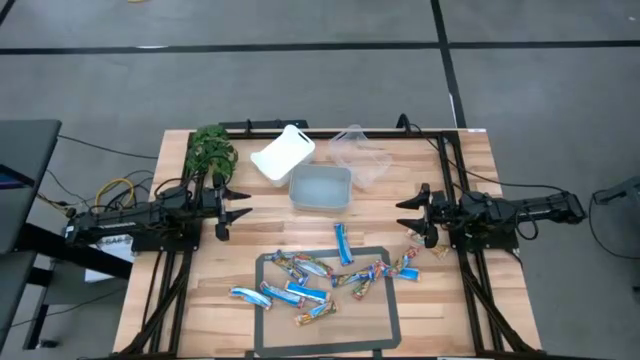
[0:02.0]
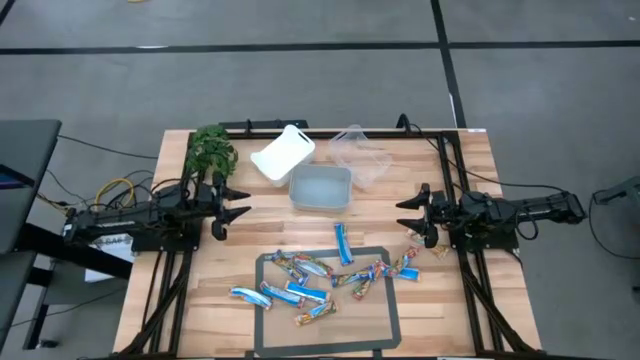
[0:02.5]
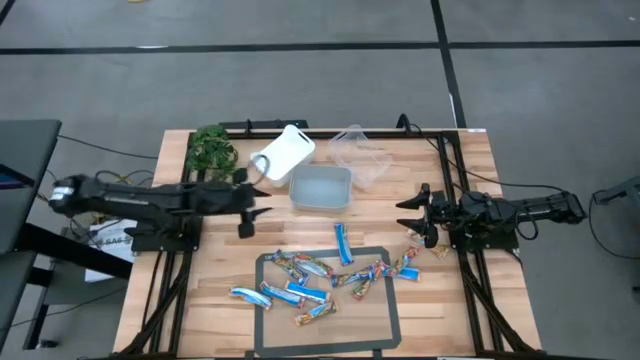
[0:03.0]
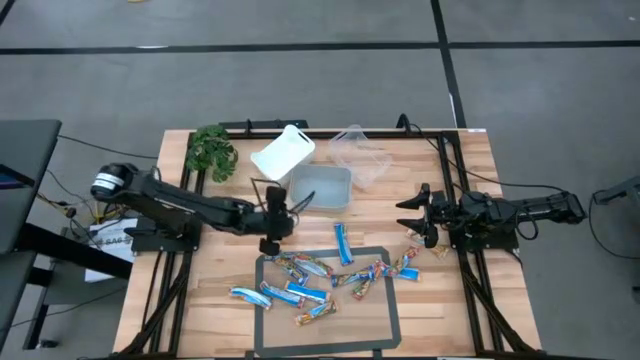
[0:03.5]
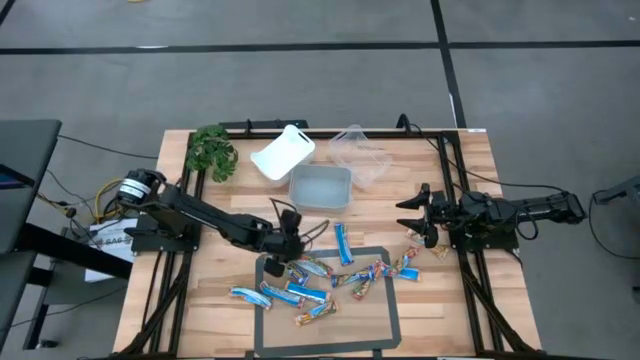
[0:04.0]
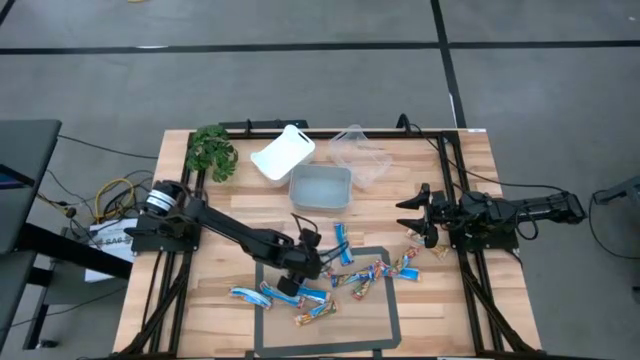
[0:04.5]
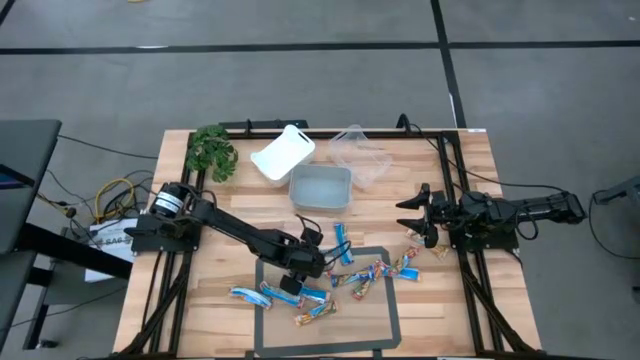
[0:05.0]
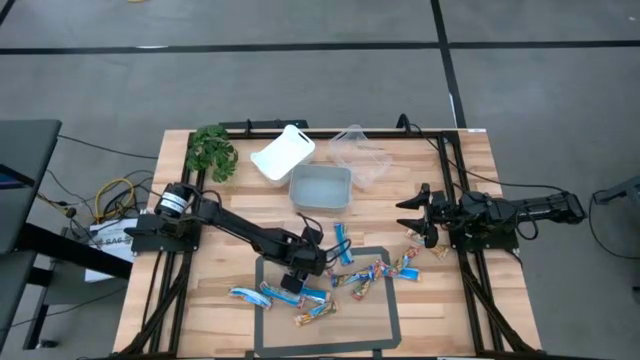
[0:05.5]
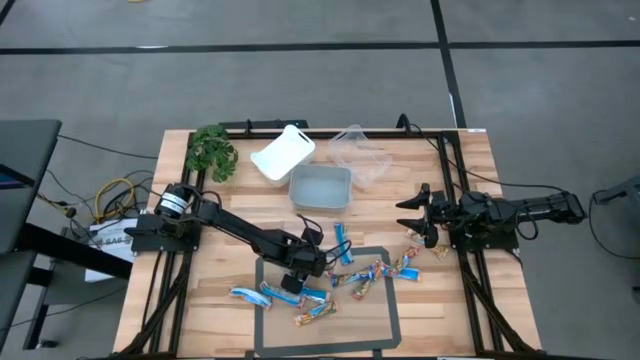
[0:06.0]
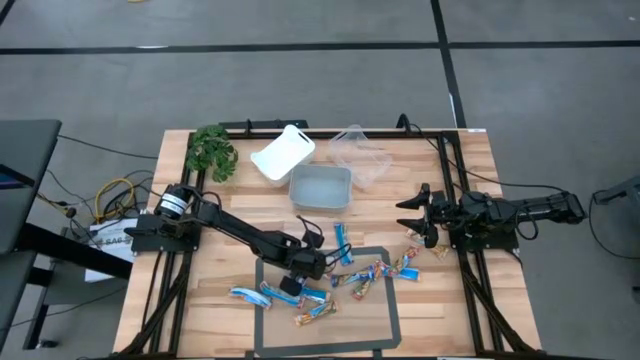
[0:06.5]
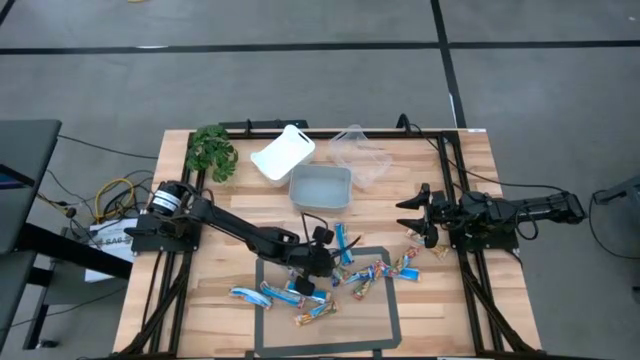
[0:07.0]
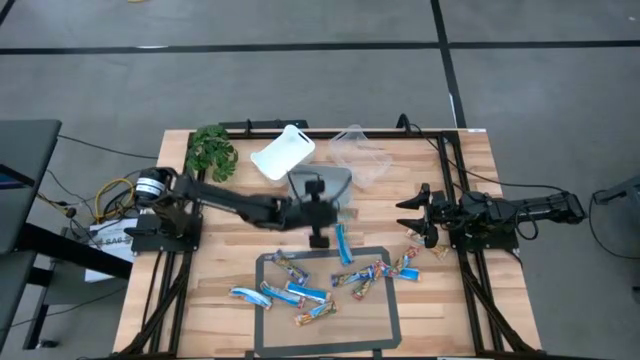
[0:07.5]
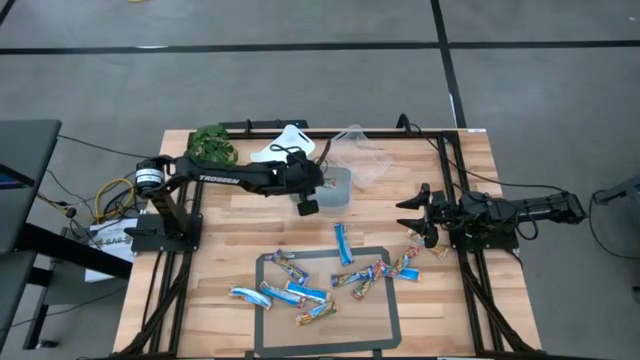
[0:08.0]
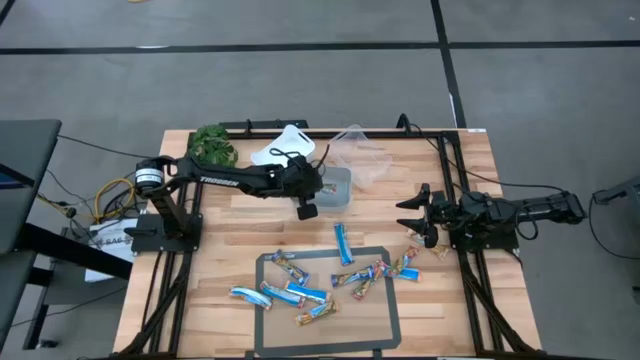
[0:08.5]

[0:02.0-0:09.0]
Task: Pick and place Granola Bars by type
Put the red granola bar into the gray bin

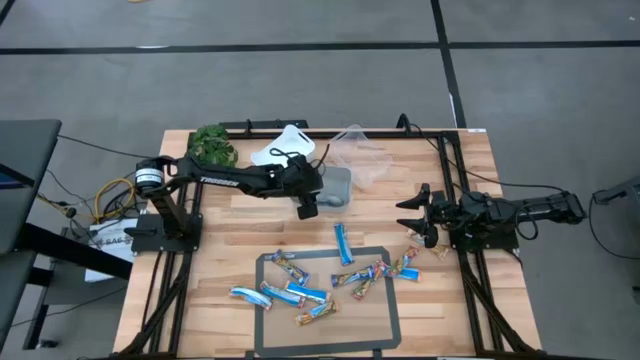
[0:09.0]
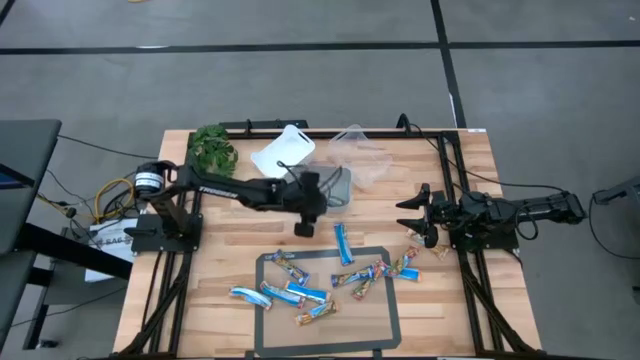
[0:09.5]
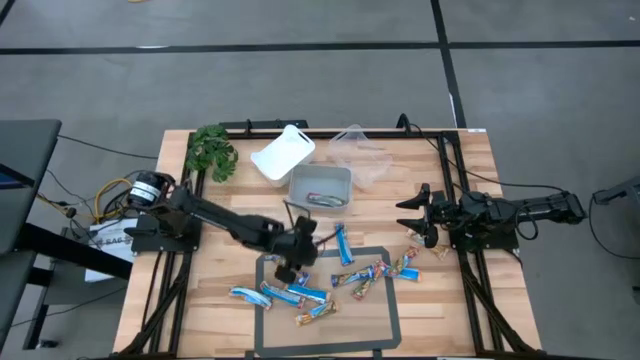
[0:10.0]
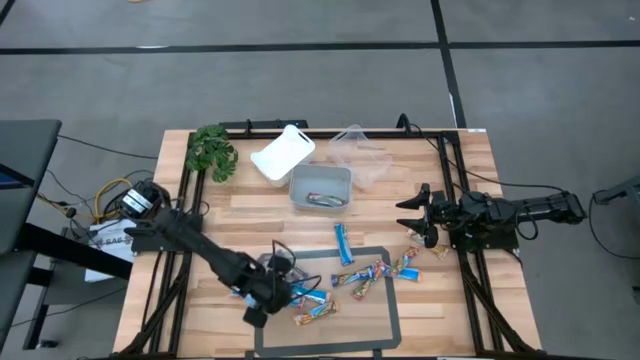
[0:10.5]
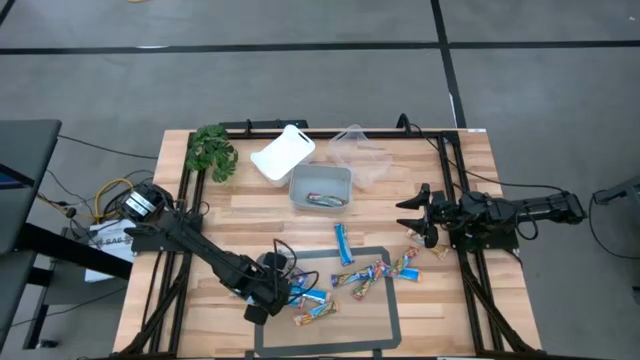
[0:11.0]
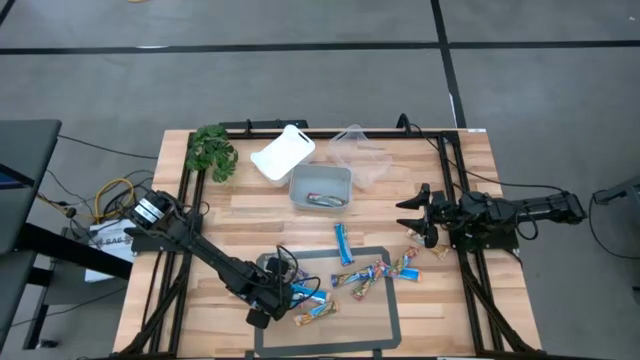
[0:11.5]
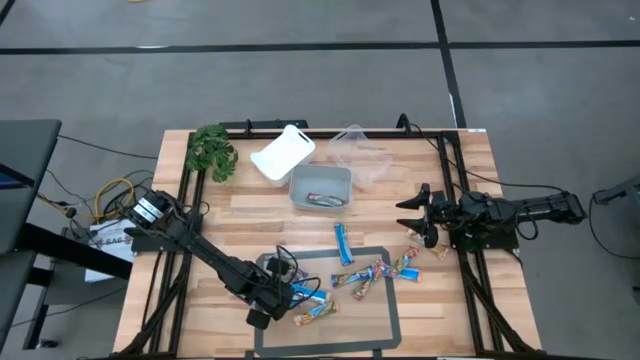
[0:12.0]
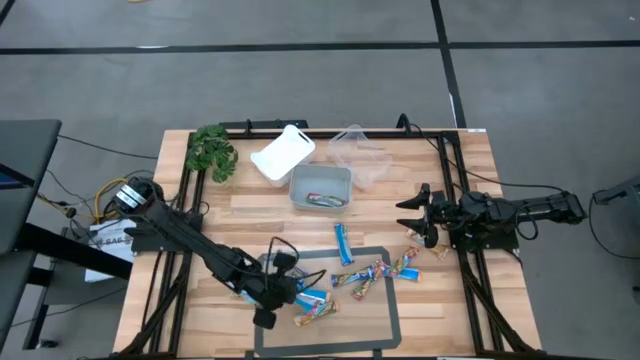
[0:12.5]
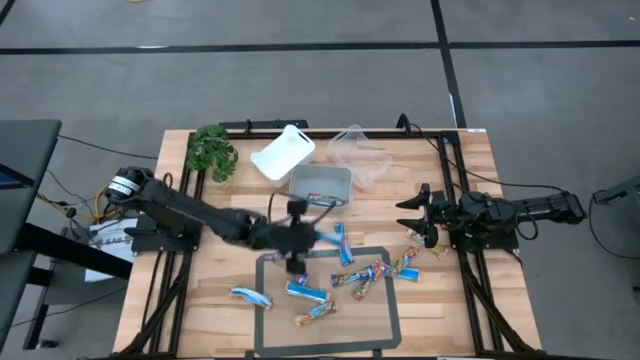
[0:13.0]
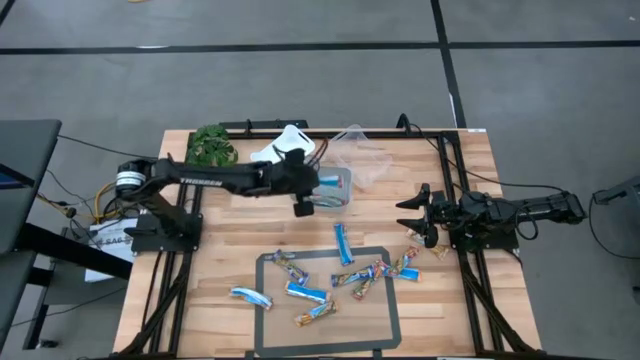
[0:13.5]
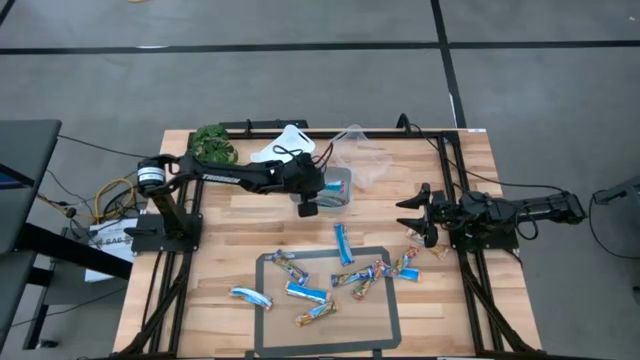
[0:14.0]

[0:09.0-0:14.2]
Put the red granola bar into the gray bin

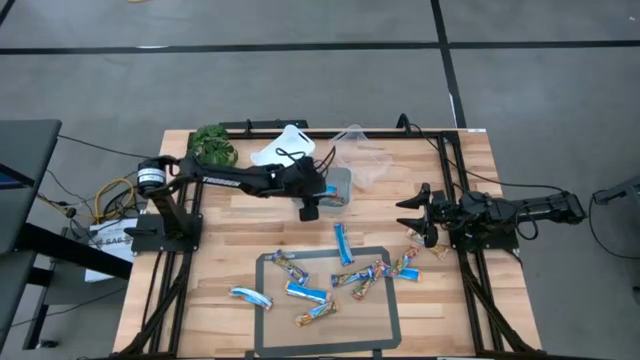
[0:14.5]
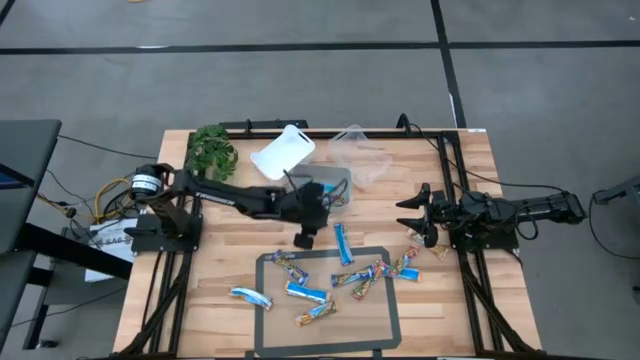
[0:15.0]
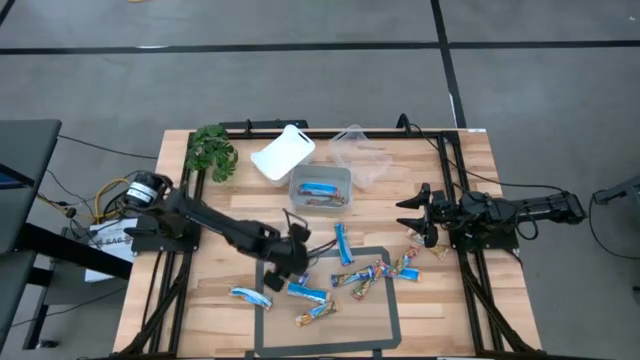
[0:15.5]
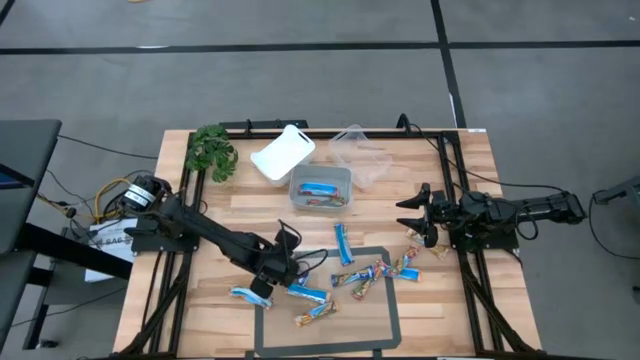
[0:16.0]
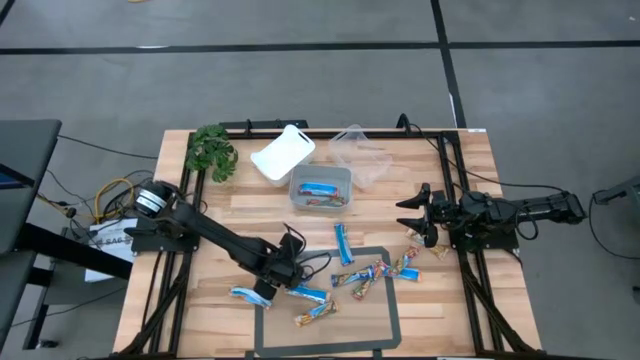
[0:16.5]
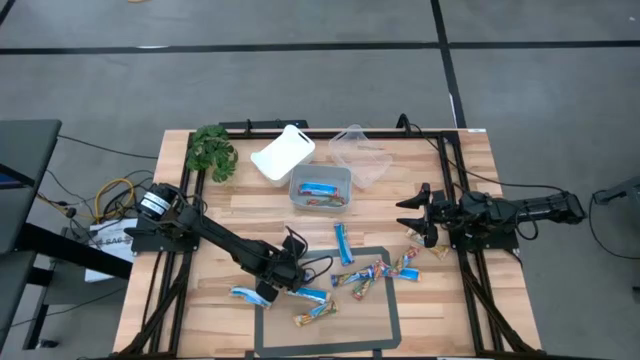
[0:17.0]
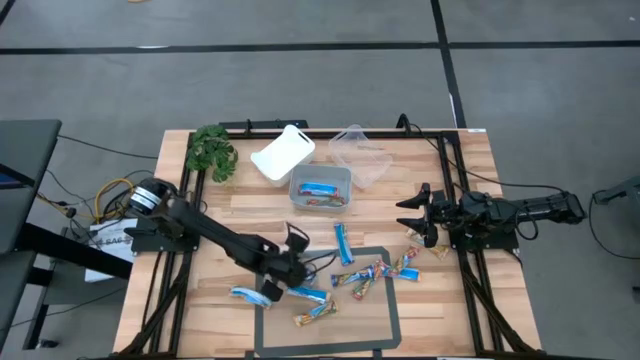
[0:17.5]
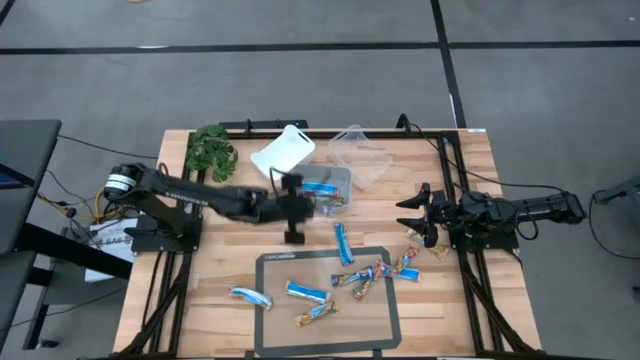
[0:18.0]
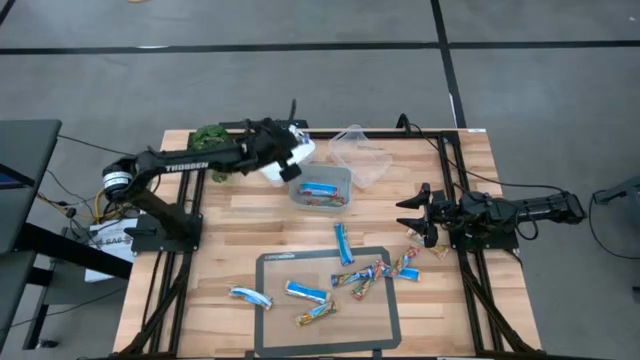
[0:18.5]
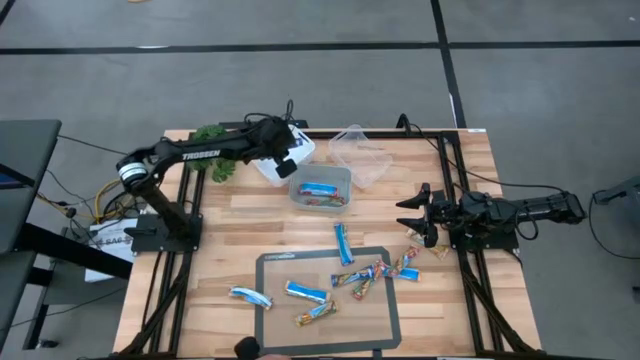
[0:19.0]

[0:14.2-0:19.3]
Put the blue granola bar into the white bin

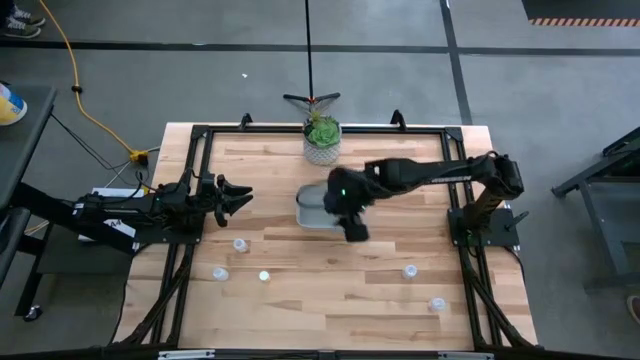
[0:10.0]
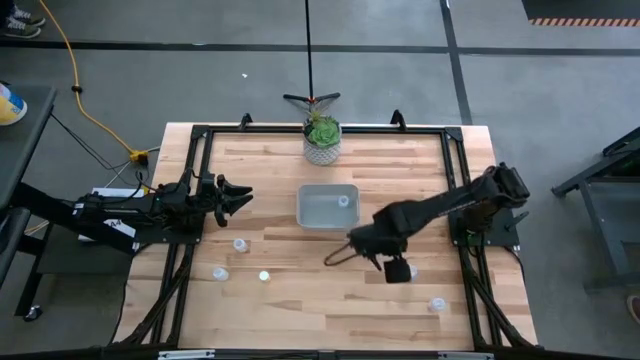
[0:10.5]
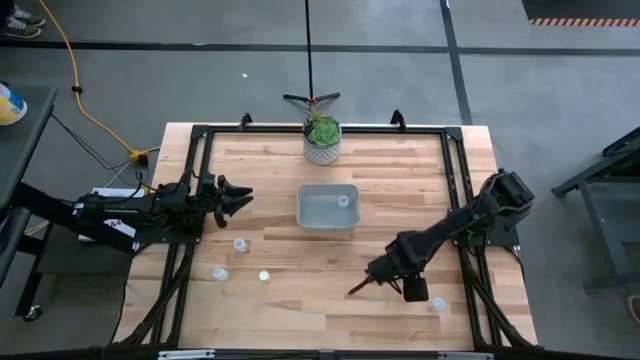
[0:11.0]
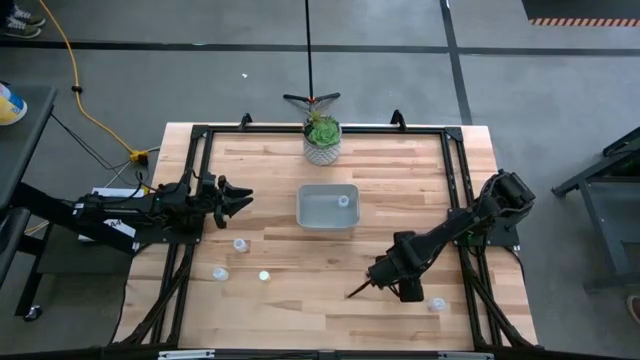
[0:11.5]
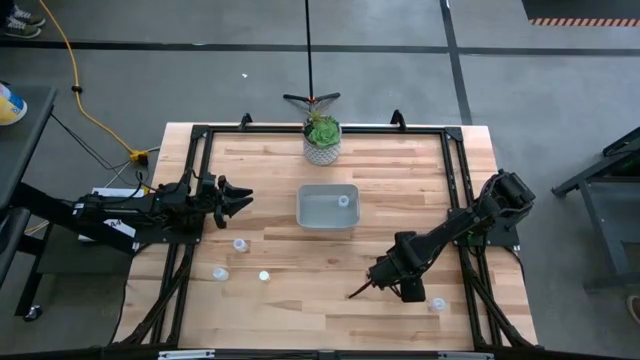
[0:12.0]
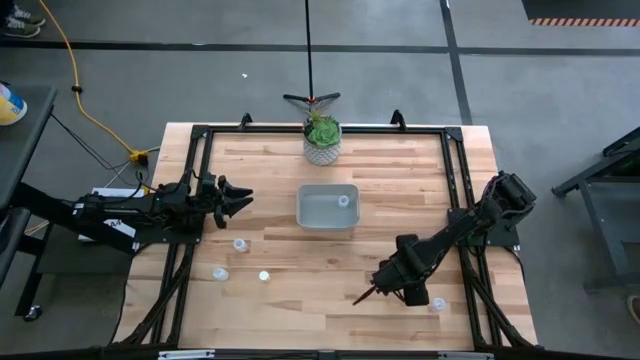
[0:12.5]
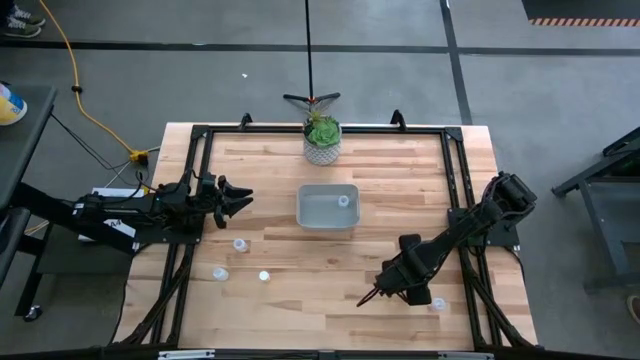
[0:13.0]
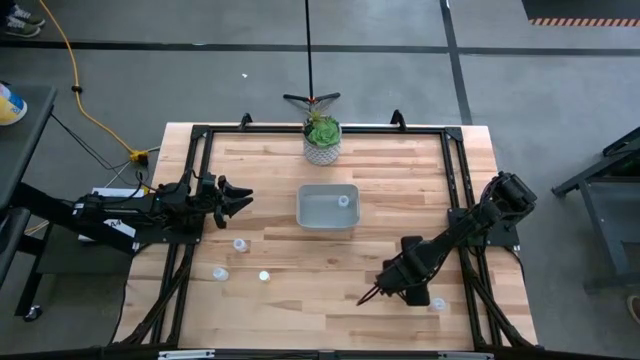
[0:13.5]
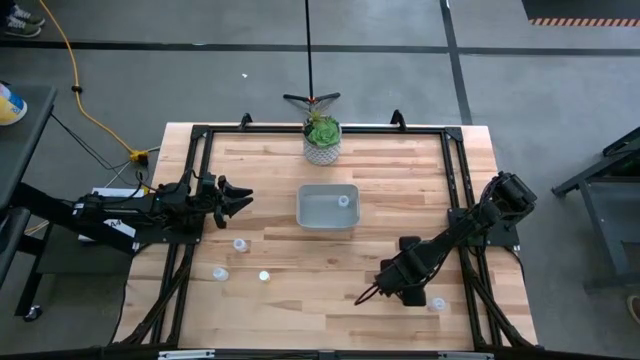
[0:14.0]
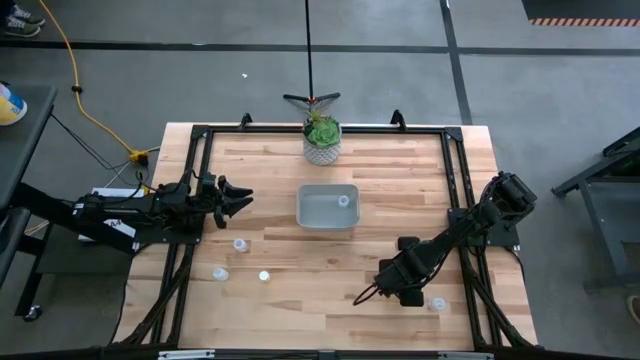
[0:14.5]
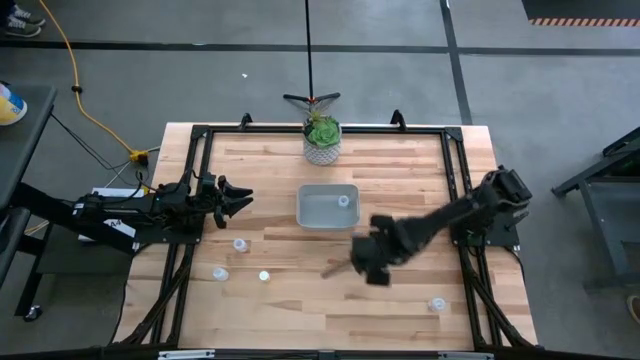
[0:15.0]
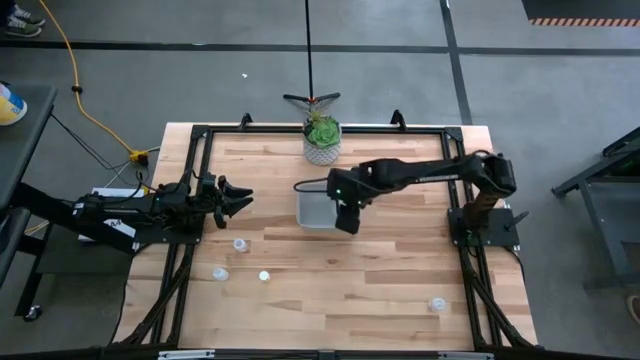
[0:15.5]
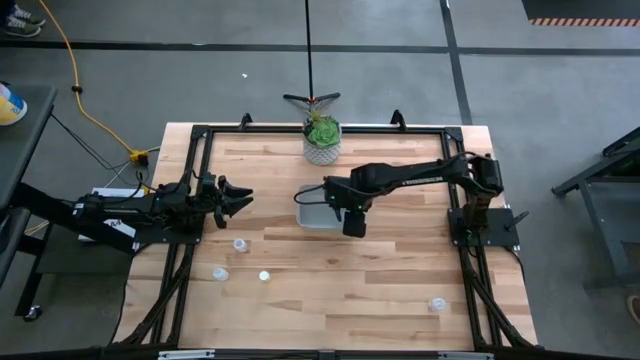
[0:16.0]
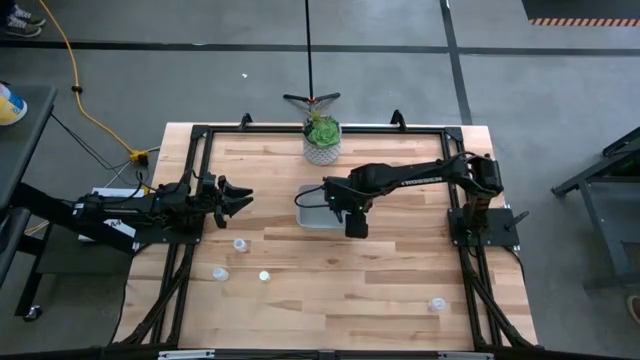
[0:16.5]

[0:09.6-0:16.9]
Task: Pick and place pill bottles into a basket
Put the middle transparent pill bottle into the gray bin
